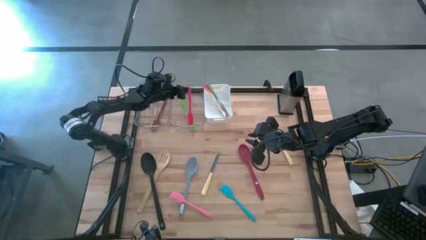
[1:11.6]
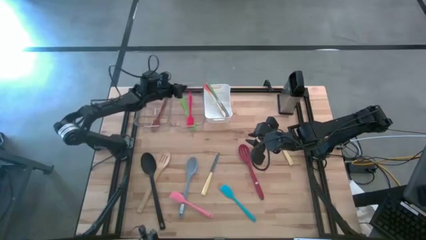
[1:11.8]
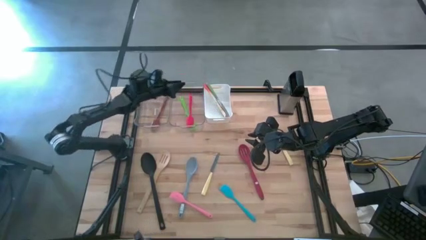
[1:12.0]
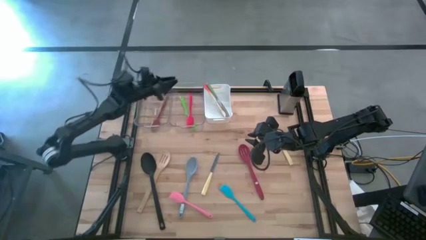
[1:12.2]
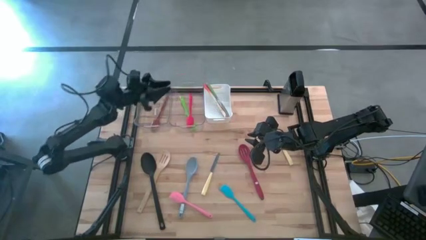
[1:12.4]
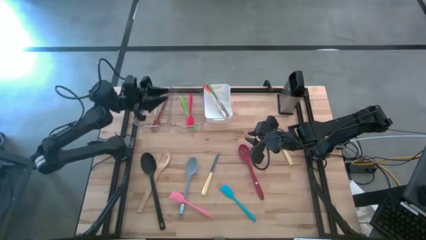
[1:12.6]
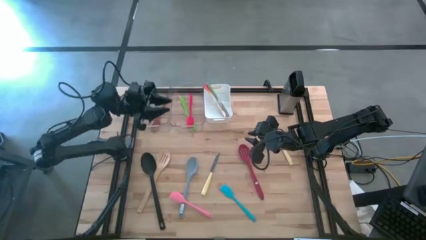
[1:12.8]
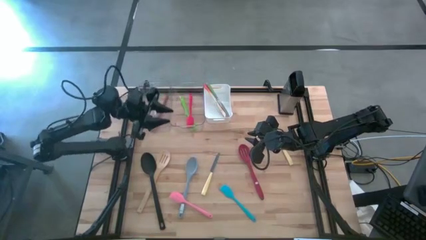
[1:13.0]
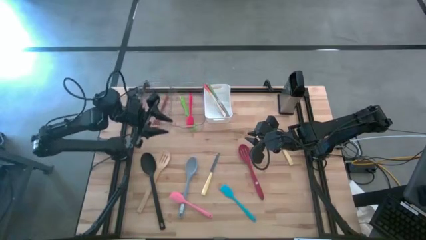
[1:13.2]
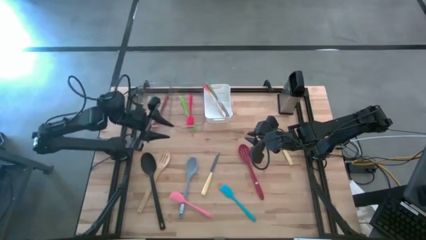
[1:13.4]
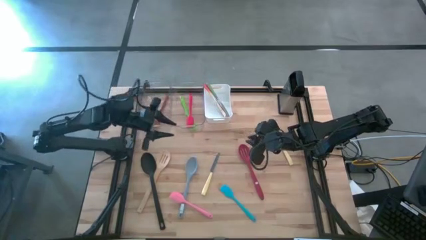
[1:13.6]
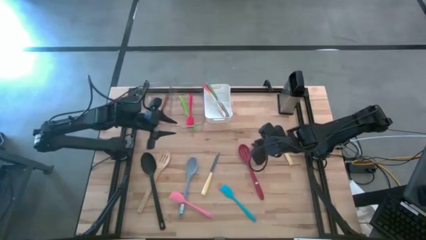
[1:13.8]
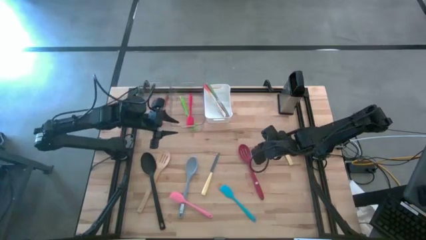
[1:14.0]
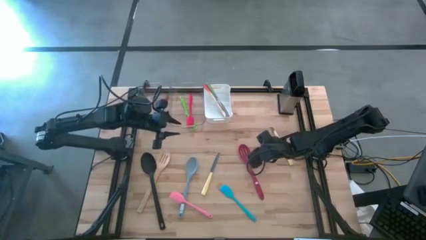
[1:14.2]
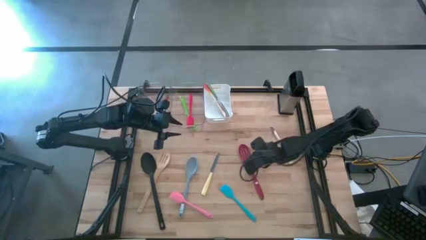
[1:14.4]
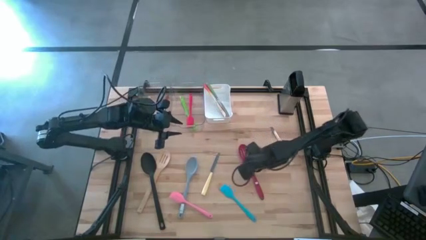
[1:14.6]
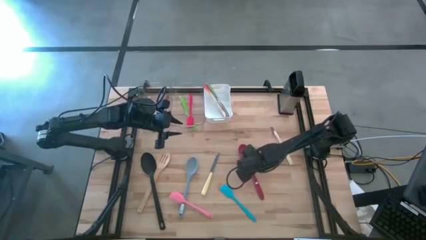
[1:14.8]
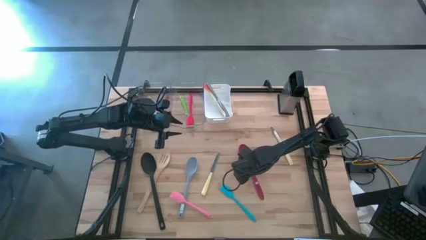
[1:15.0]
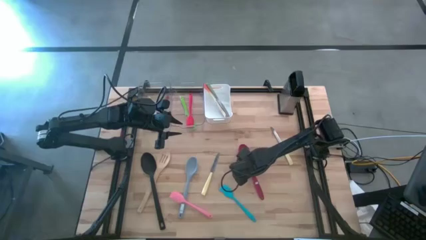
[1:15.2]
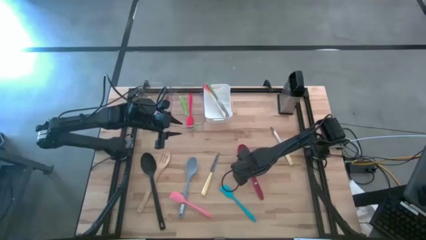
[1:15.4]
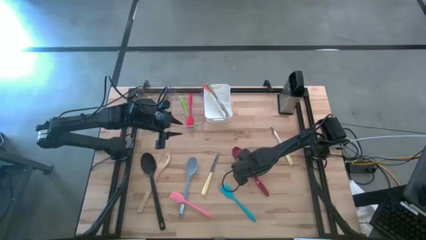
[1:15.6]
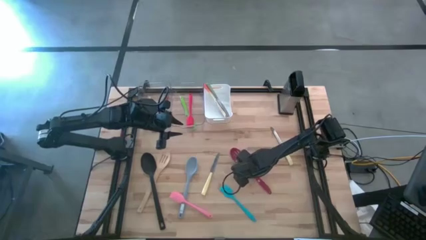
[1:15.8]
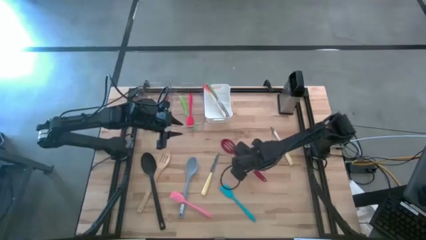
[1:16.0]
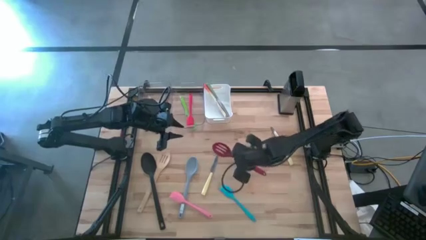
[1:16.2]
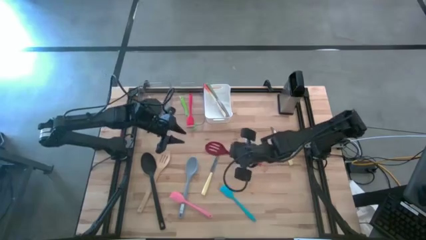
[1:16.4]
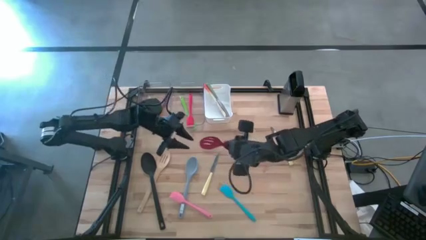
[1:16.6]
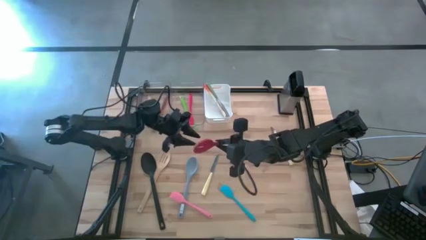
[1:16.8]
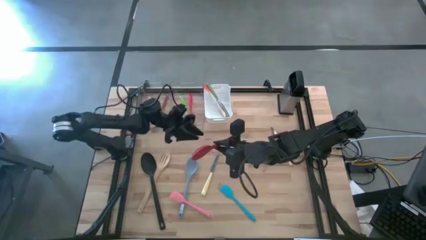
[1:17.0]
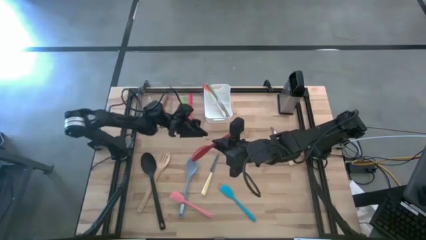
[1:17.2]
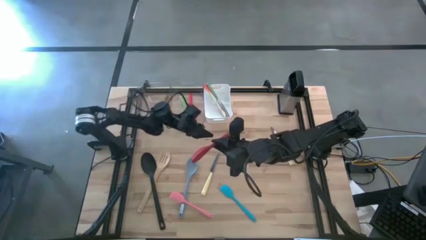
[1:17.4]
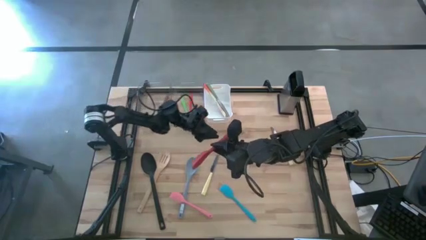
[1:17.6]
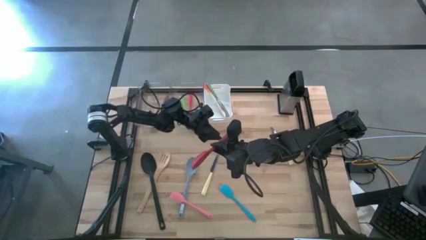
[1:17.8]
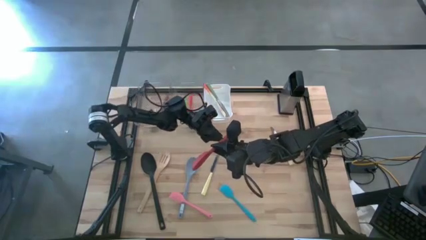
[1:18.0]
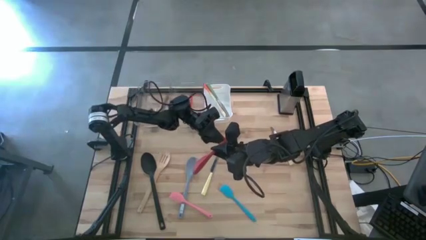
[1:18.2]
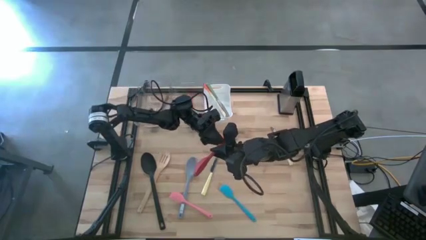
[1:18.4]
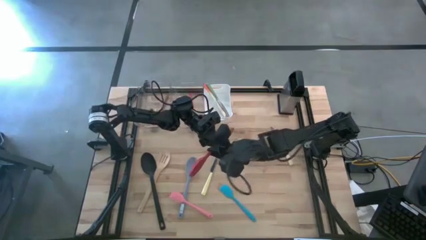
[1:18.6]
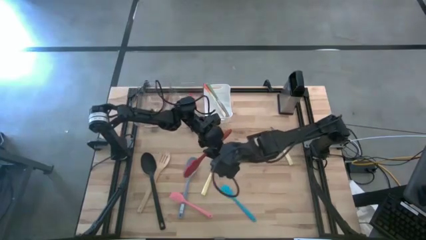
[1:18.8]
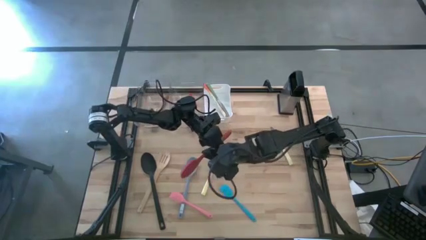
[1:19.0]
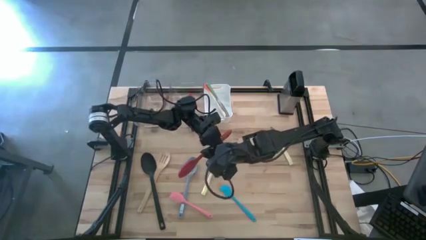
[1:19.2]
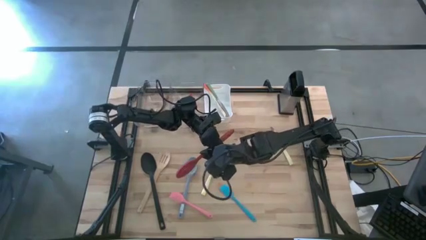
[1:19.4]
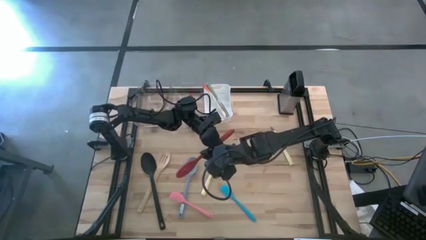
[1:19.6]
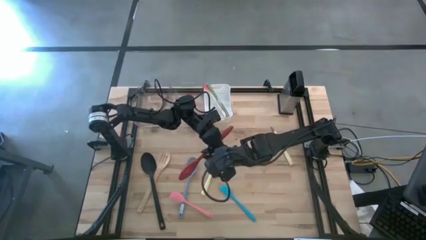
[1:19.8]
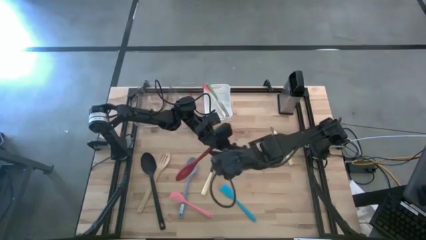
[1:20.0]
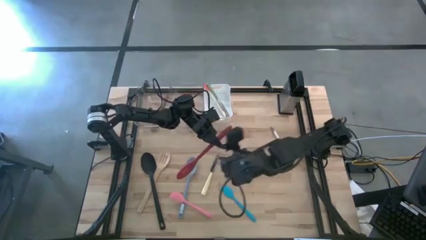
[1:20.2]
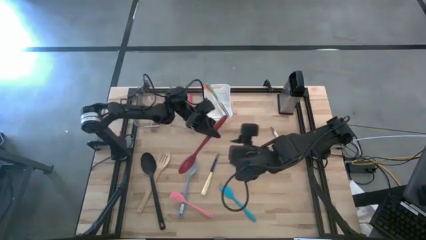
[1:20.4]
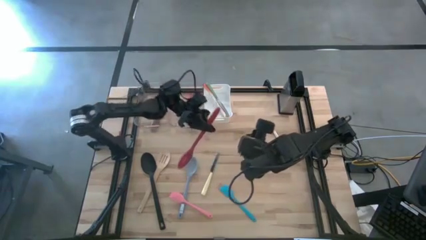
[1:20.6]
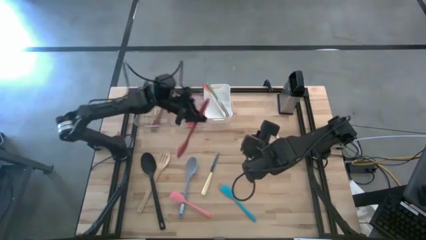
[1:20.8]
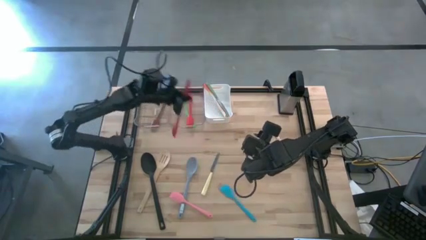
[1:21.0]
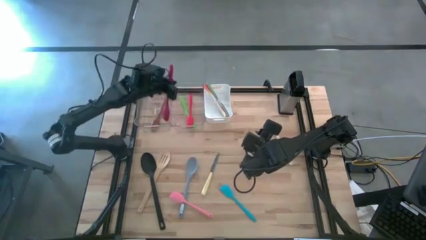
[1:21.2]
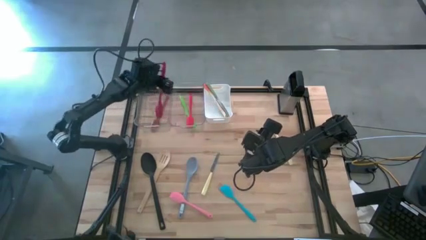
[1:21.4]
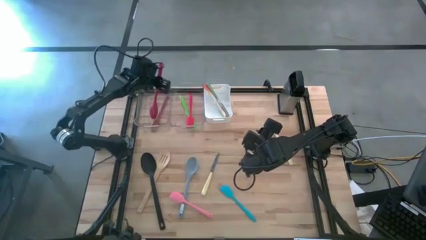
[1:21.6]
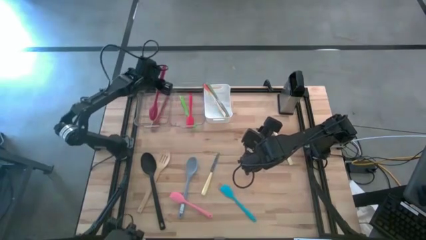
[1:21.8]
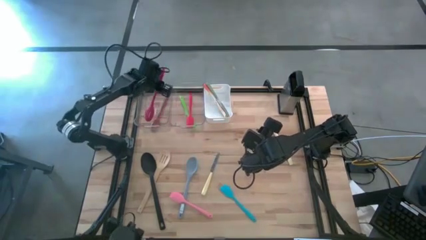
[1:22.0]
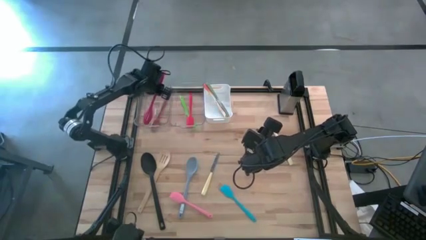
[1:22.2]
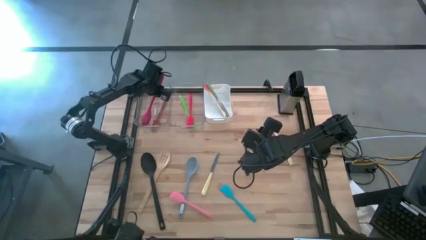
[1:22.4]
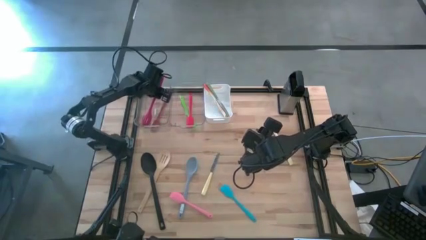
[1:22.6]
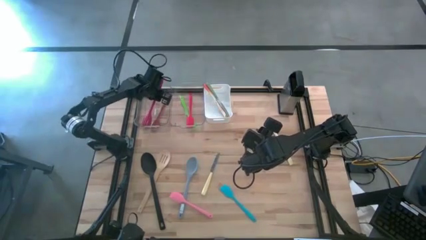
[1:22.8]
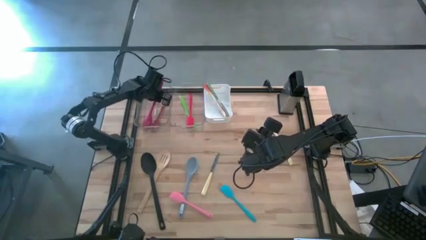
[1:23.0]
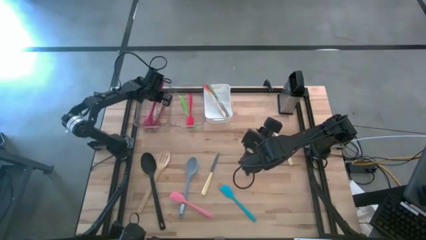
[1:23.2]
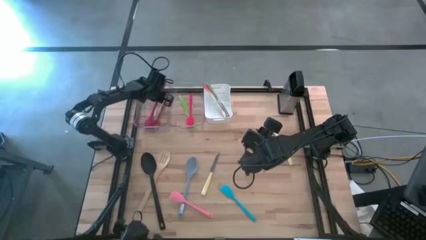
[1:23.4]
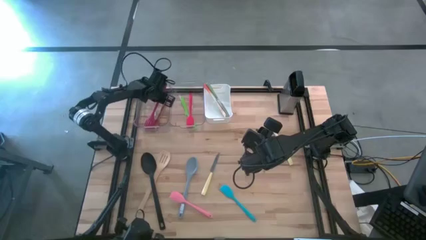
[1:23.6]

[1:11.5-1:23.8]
Task: Pick & Place Kitchen Items
Put the red serving spoon into the left transparent bin

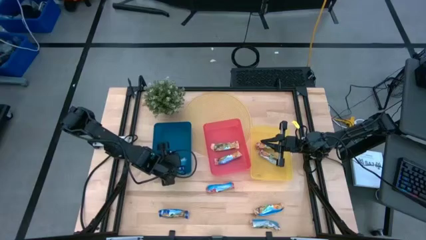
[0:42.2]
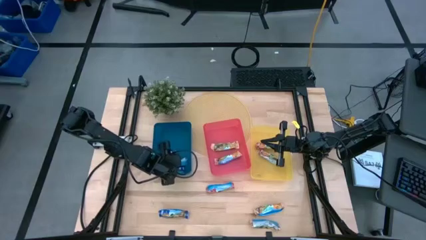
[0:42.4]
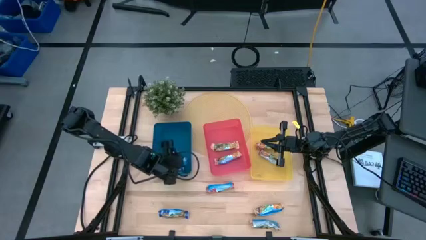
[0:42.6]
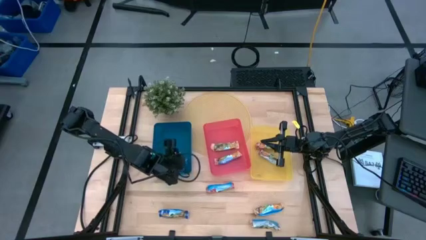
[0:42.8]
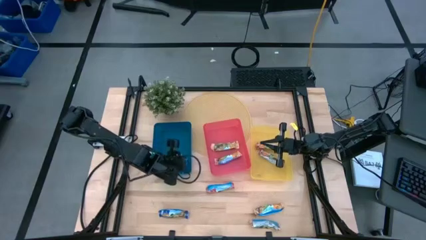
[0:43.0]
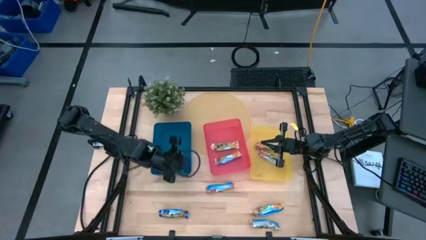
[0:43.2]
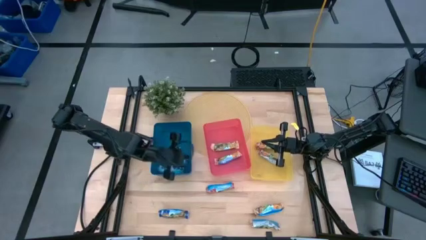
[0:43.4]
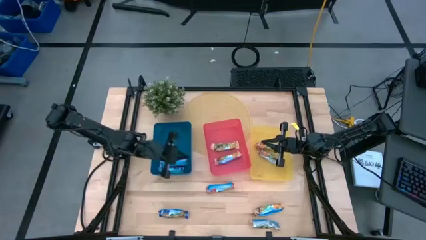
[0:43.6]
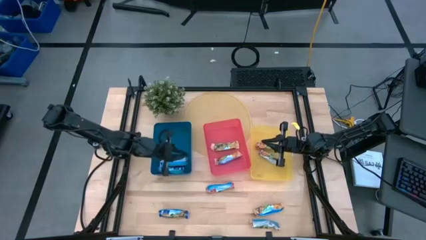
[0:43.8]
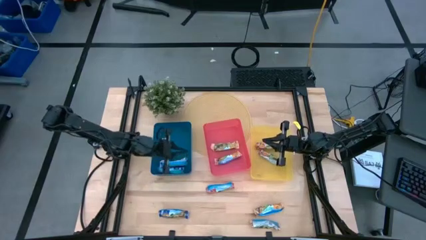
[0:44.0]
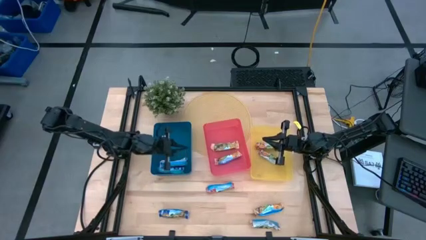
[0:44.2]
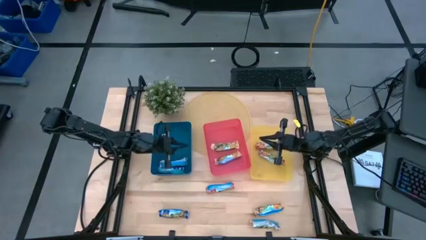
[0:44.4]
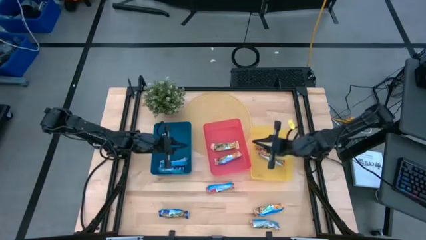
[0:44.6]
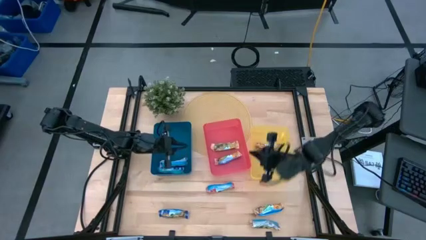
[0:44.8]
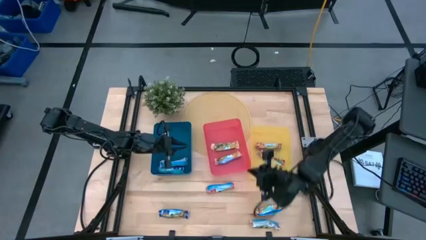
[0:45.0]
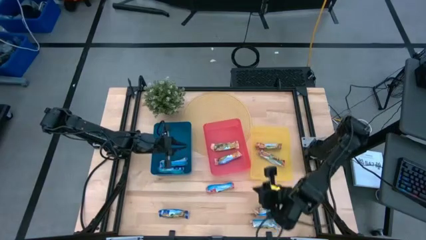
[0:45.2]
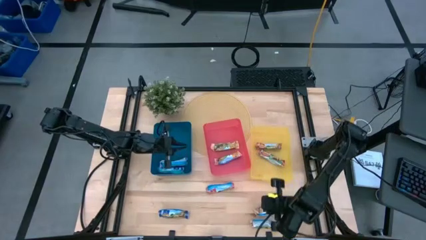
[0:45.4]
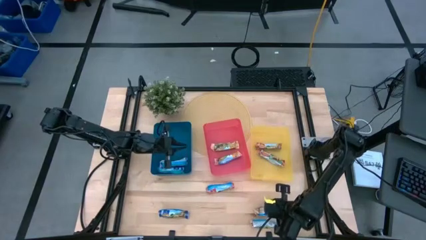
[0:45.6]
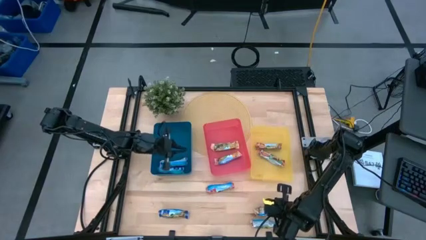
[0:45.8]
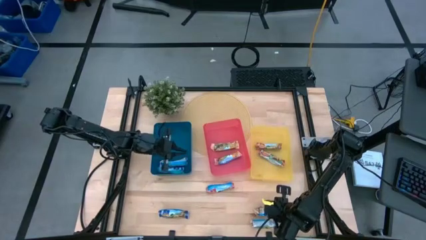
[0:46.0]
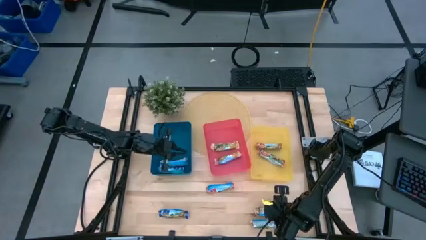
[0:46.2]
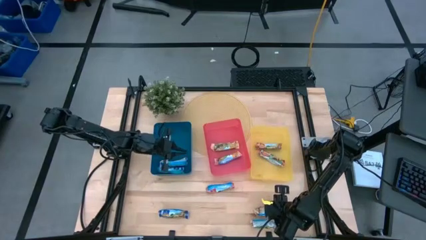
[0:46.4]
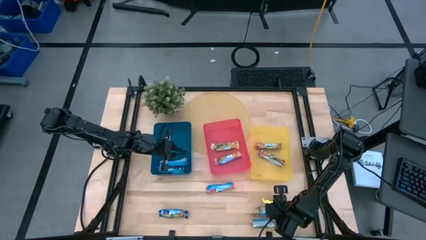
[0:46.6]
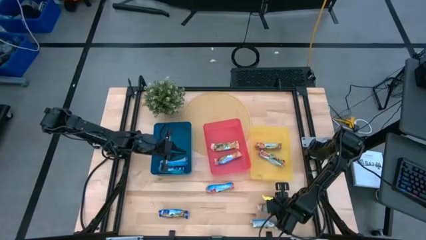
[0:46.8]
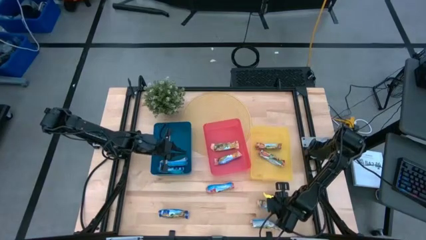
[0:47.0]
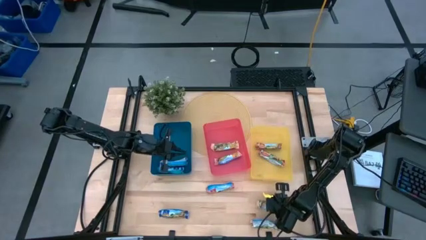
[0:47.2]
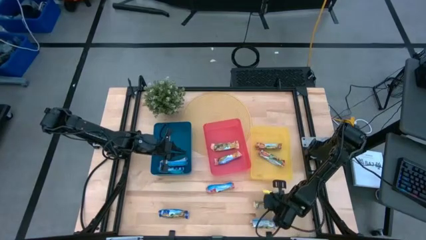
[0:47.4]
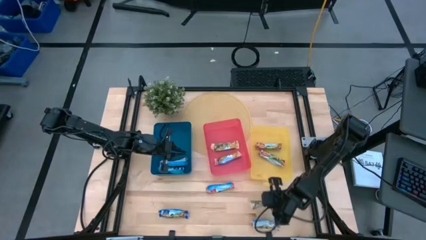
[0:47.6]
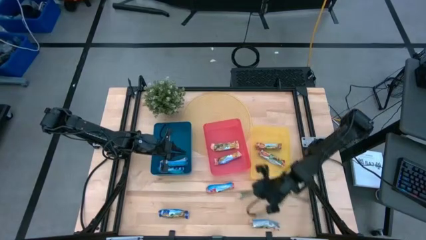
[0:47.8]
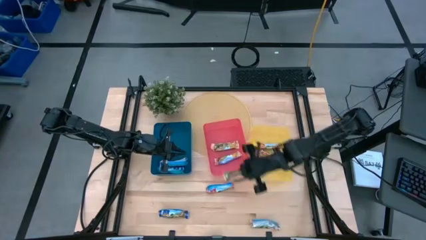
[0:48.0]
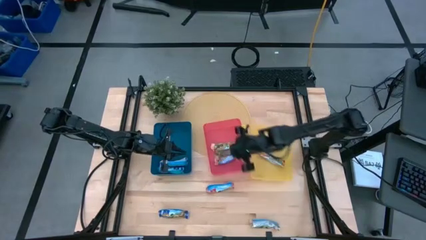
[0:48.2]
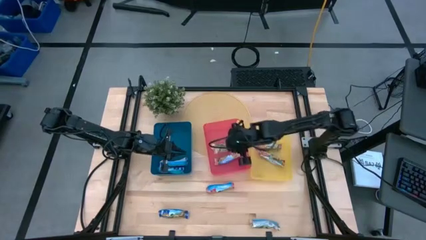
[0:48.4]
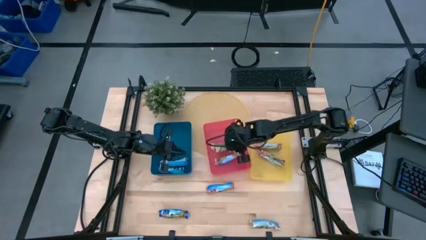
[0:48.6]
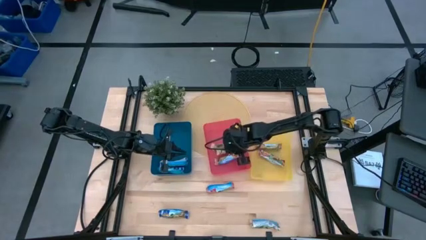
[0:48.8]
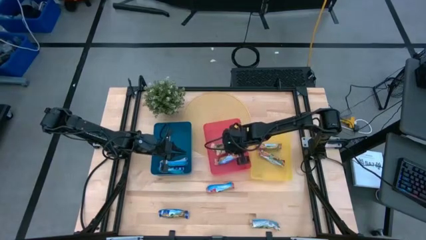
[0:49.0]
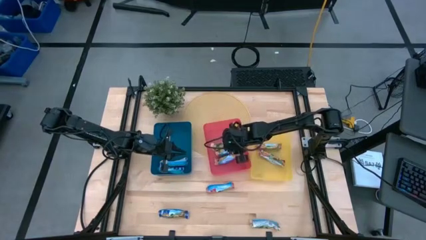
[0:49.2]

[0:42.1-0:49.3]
Task: Pick and place Granola Bars by type
Put the yellow granola bar into the red bin
